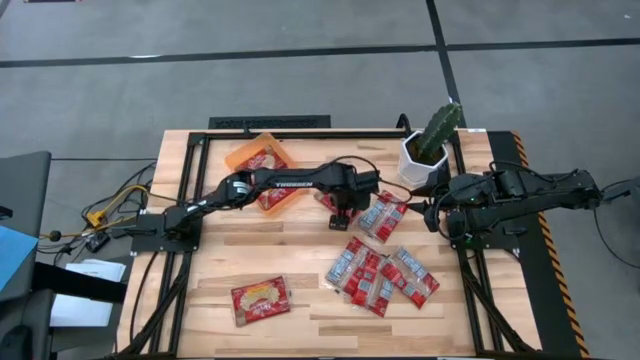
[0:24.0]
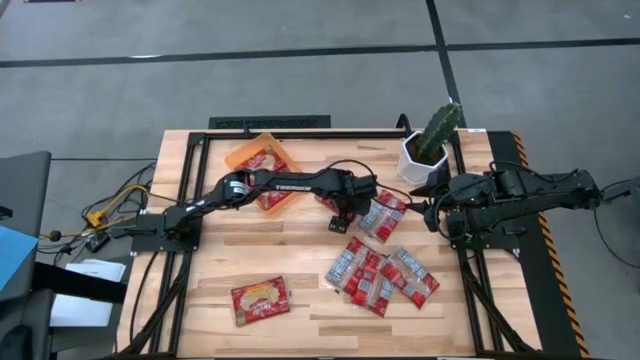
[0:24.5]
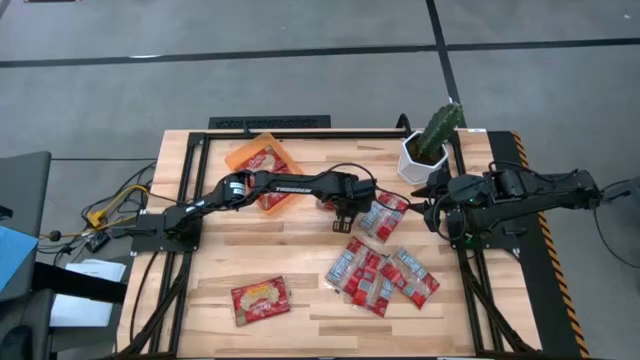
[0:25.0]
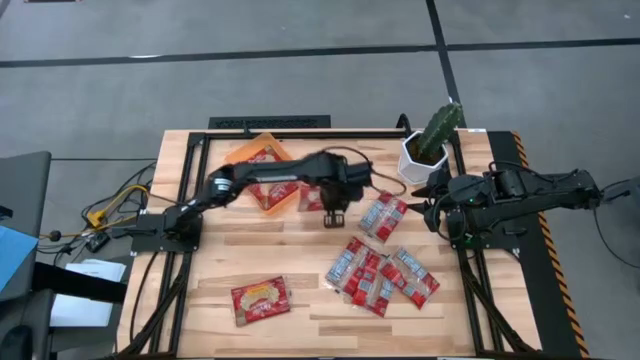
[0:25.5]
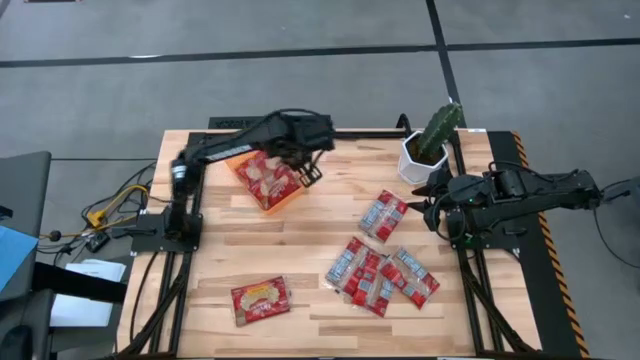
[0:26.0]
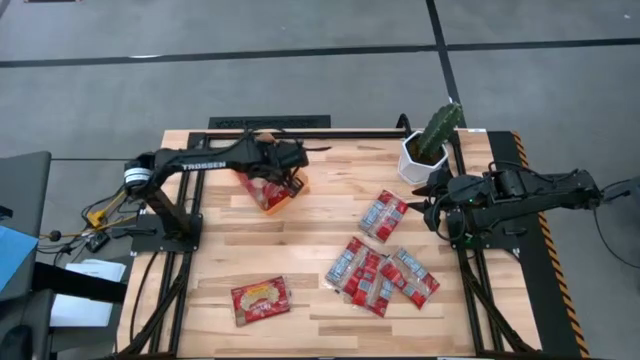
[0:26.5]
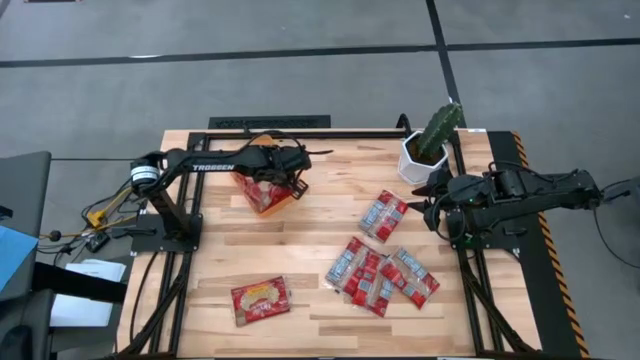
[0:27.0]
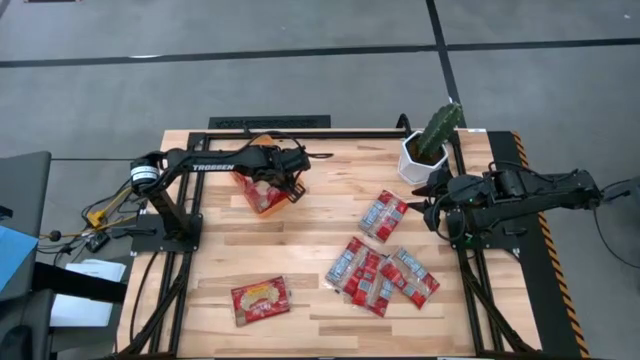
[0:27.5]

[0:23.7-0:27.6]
Task: Sort popcorn bags into baskets
Put the red popcorn bag into the orange bin

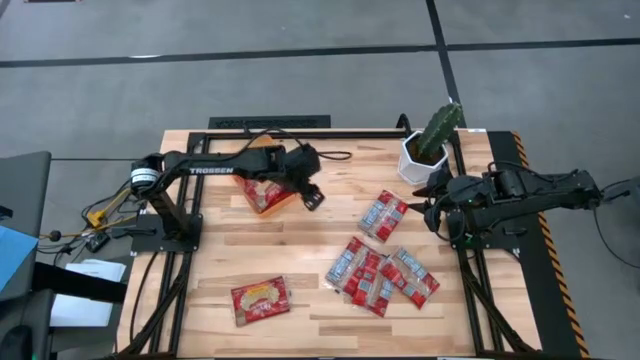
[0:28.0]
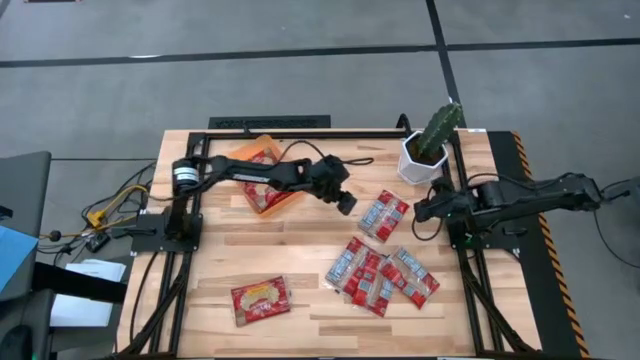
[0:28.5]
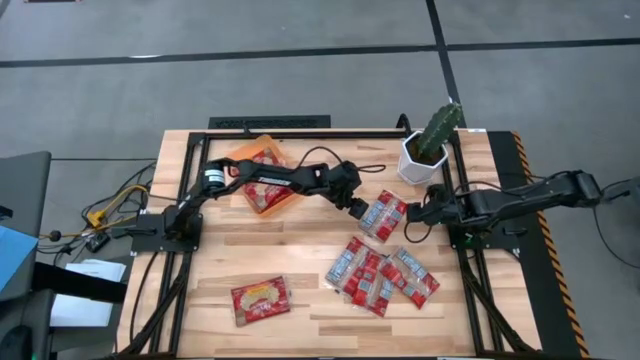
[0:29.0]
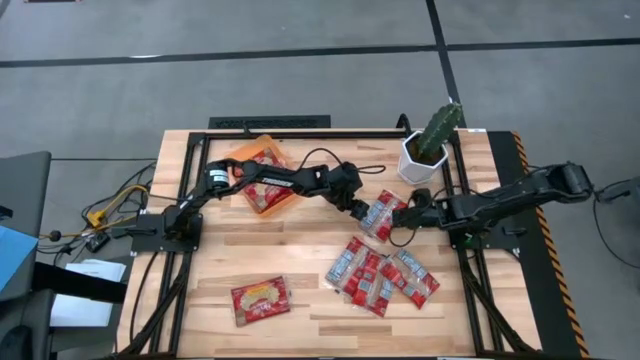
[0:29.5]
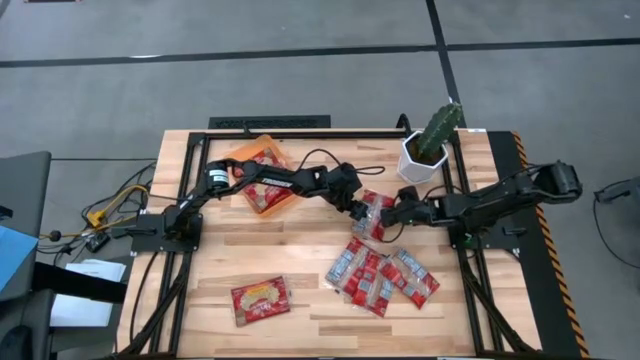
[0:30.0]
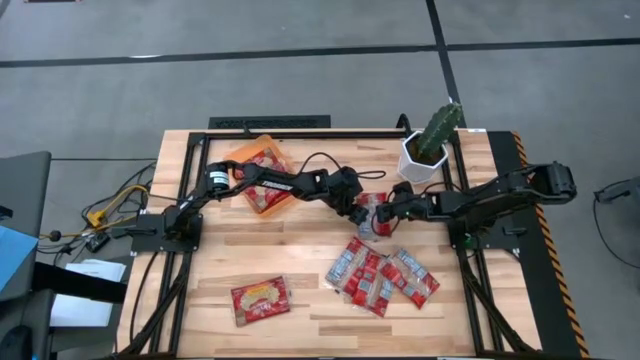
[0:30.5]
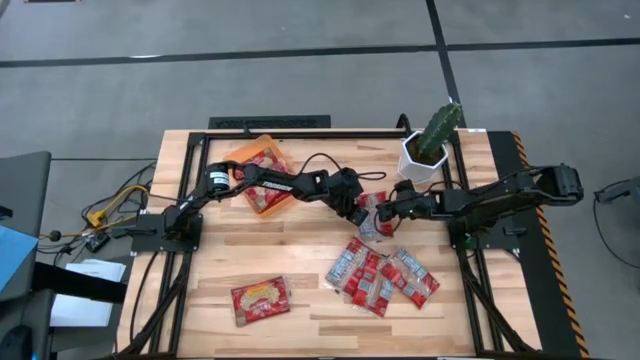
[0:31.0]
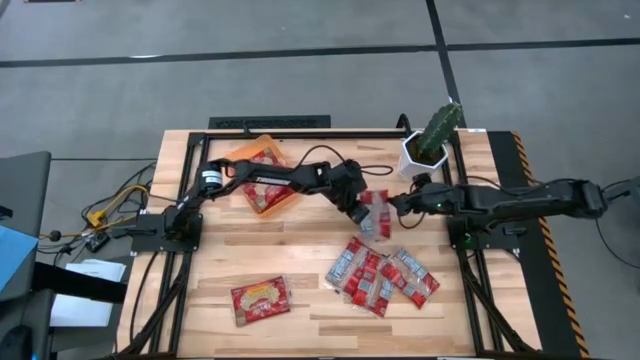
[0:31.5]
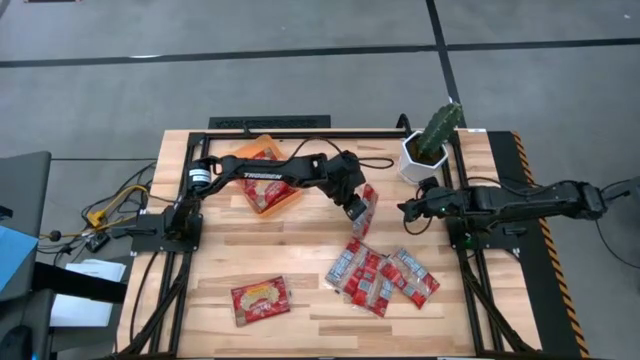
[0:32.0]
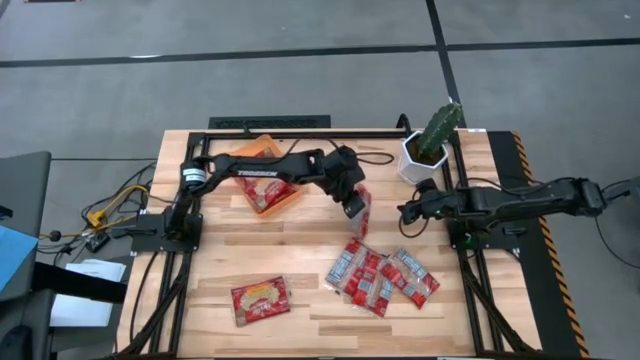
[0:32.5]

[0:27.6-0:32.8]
Put the red popcorn bag into the orange bin

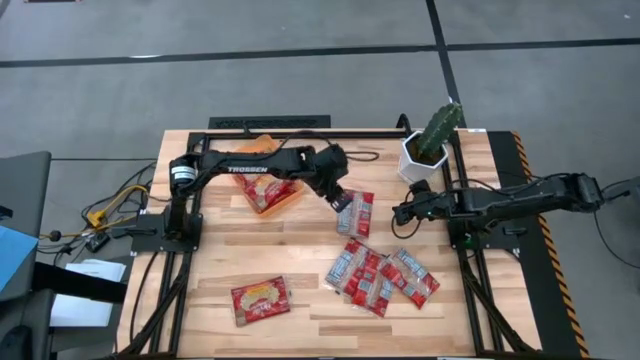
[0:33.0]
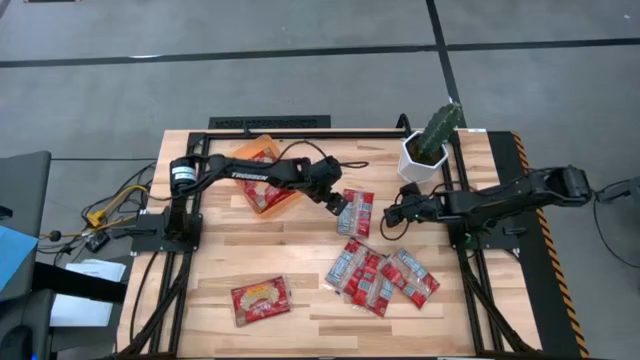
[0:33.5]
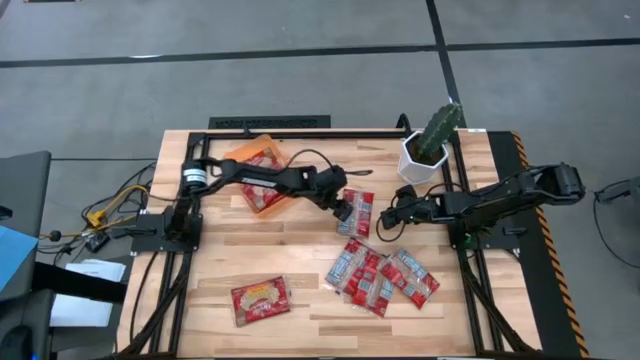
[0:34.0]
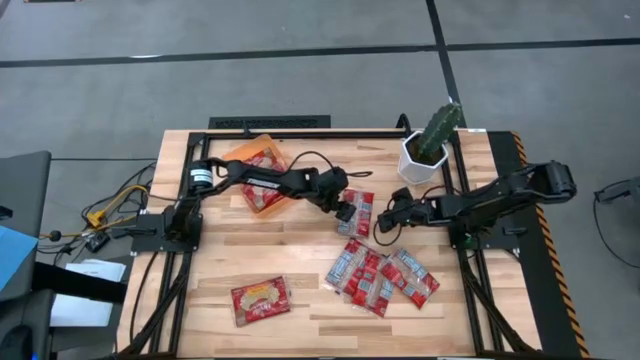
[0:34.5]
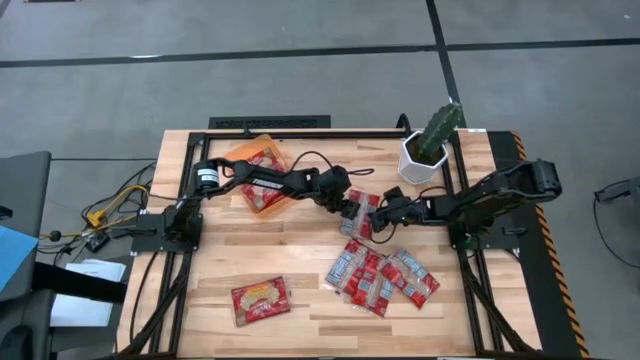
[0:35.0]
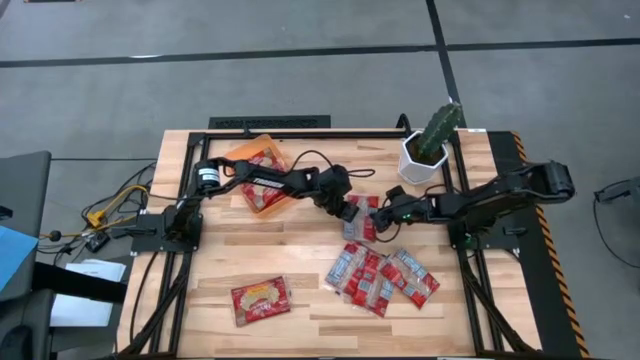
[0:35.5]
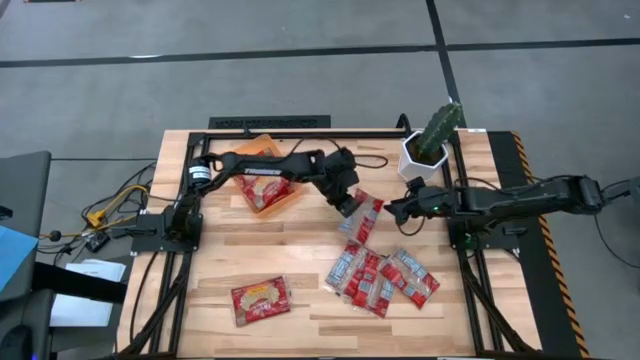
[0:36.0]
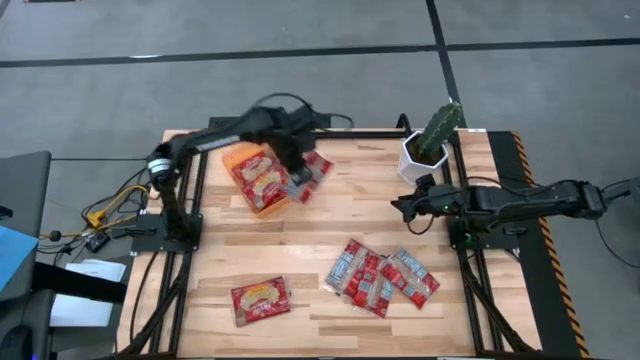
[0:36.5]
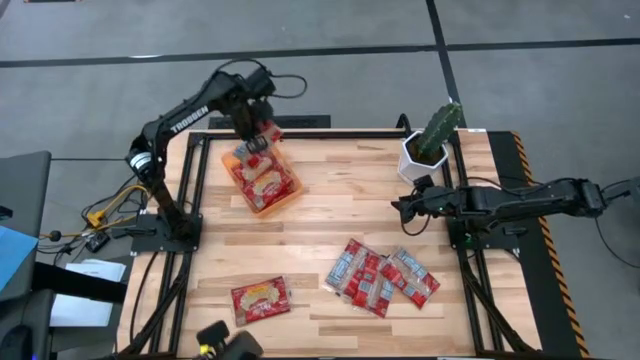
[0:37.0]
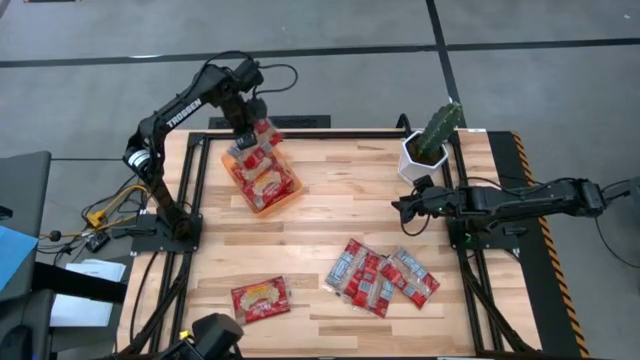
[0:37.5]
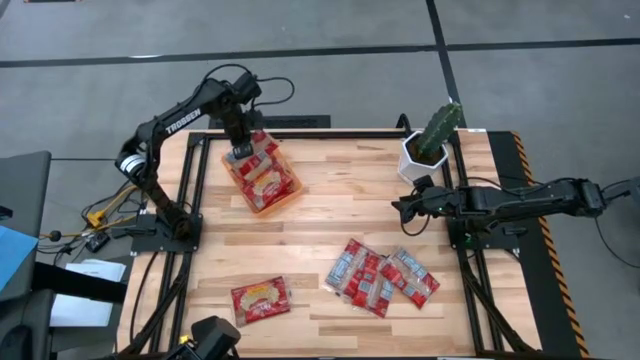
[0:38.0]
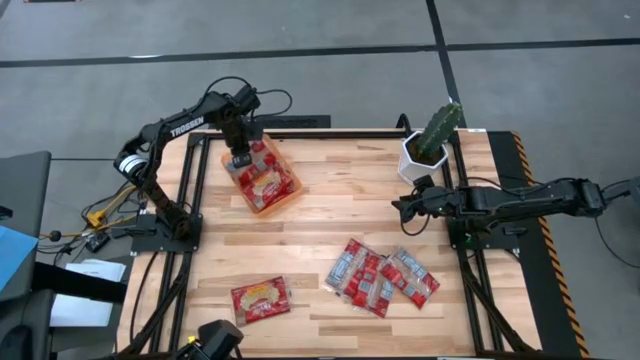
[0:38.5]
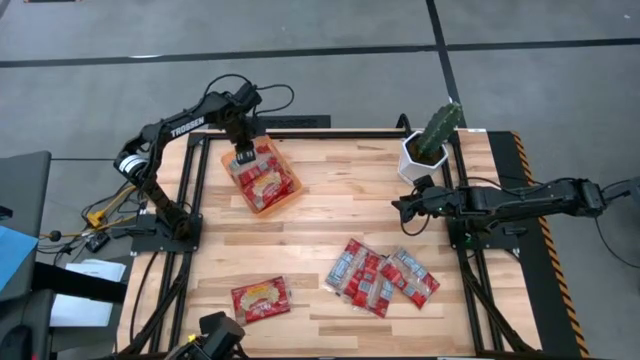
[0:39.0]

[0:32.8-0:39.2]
Put the red popcorn bag into the orange bin

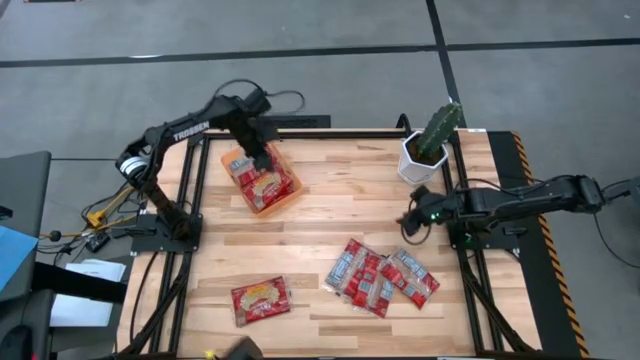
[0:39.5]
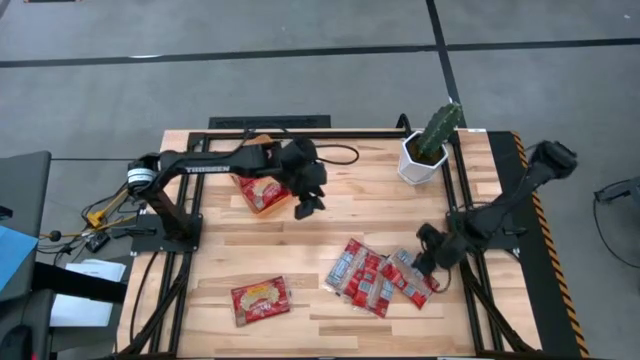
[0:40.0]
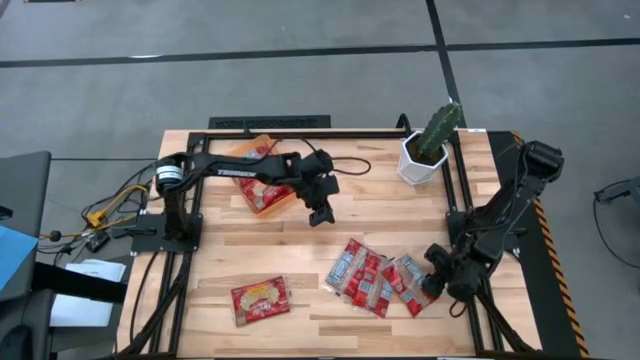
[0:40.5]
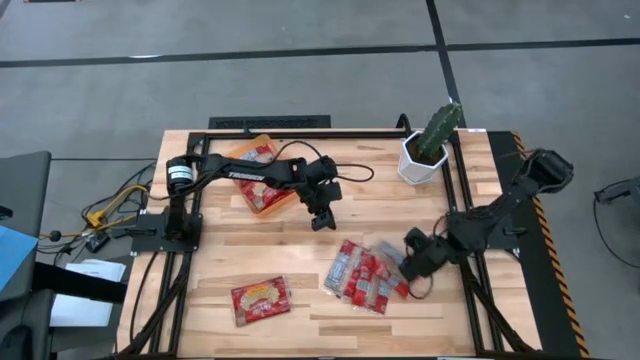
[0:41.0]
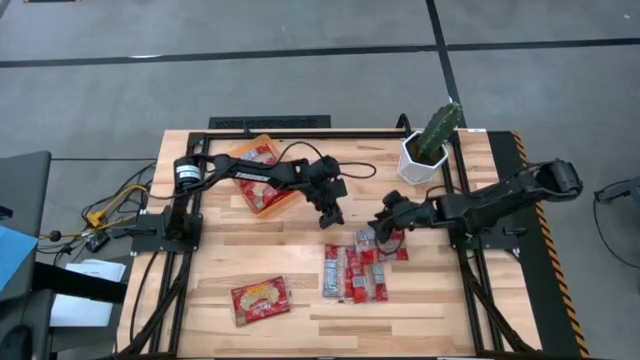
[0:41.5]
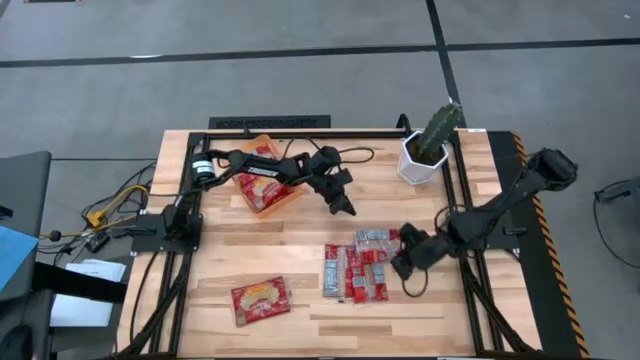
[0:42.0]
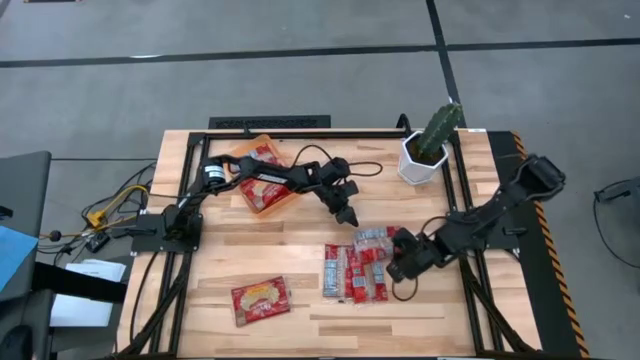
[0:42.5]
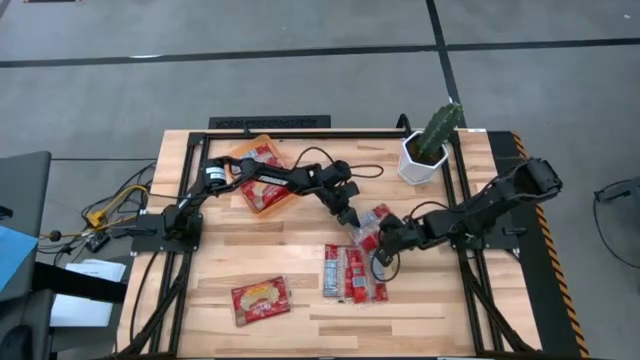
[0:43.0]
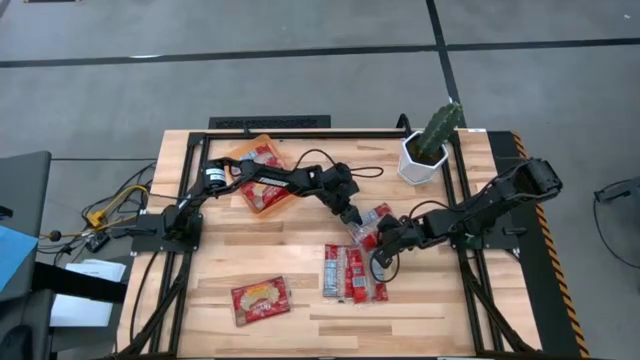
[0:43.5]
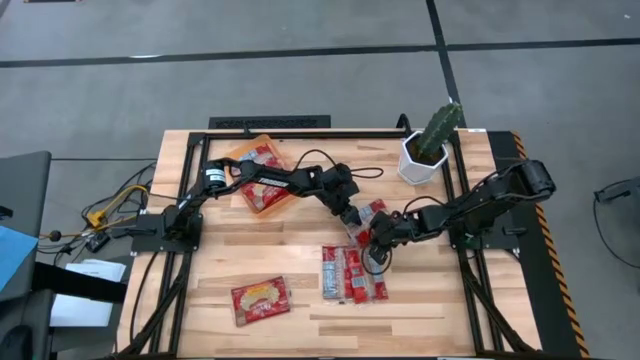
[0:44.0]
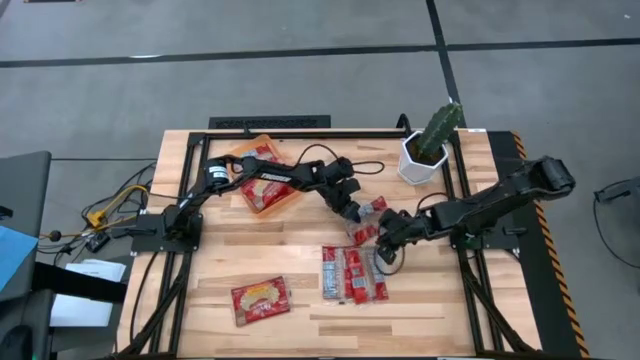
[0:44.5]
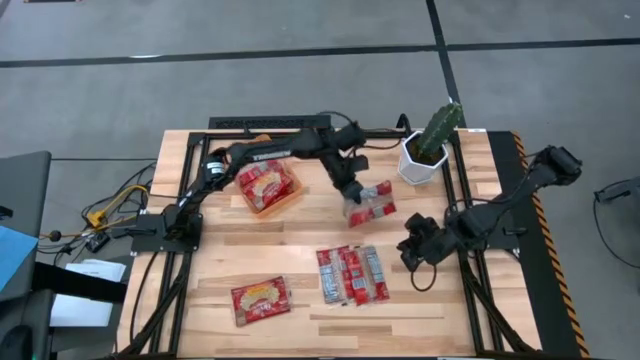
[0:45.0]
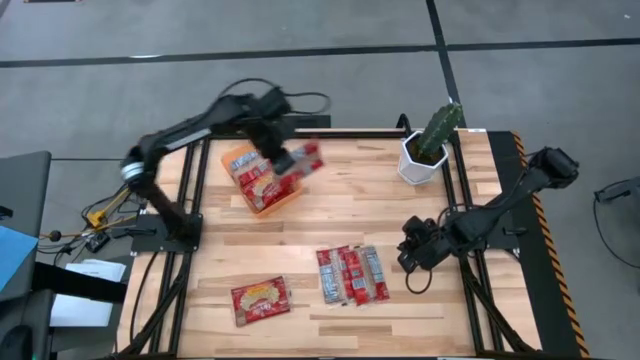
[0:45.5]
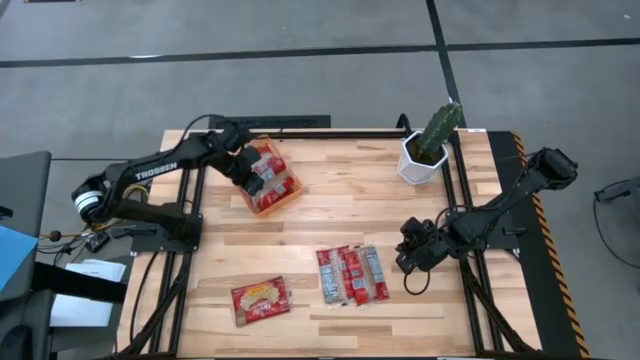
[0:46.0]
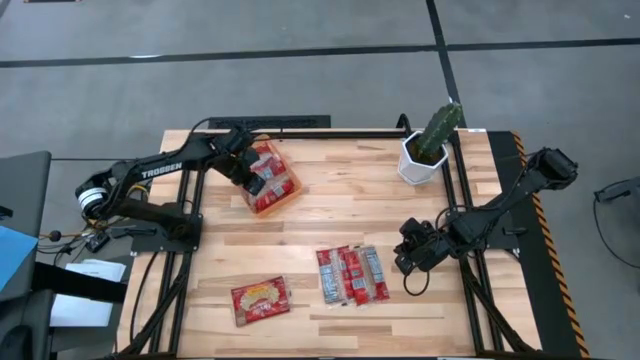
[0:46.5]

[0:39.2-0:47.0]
Put the red popcorn bag into the orange bin
